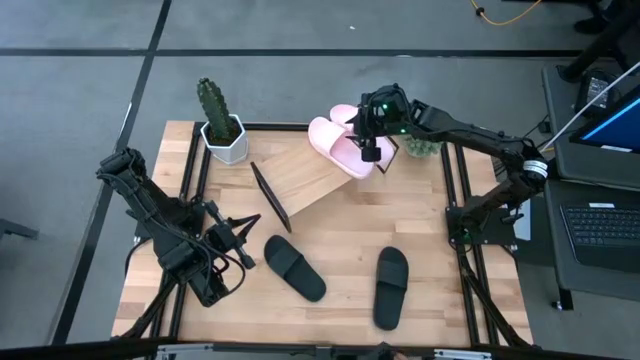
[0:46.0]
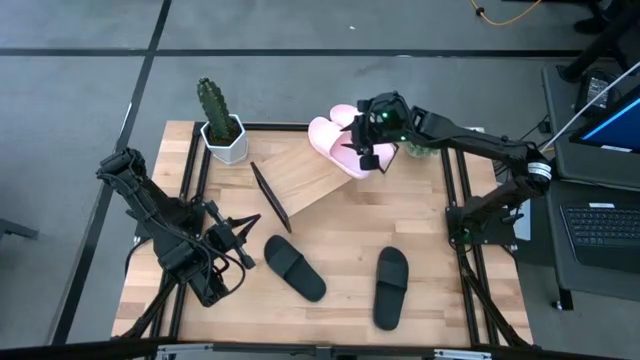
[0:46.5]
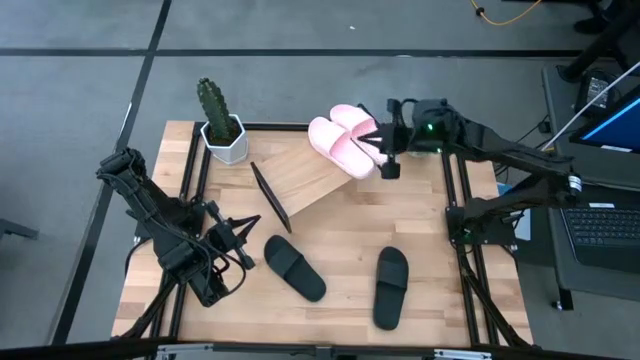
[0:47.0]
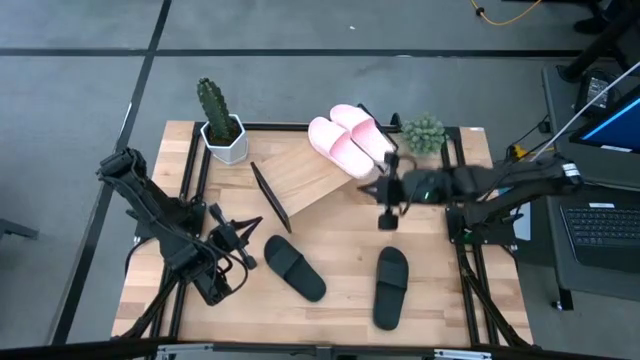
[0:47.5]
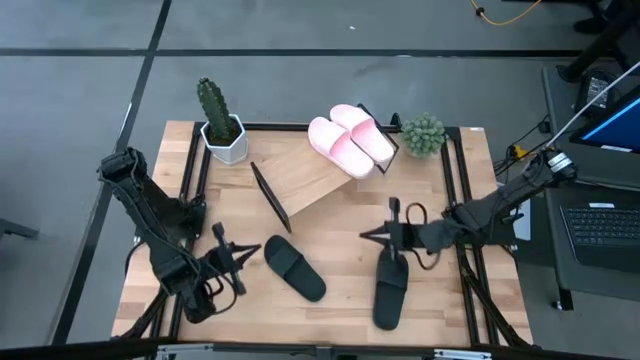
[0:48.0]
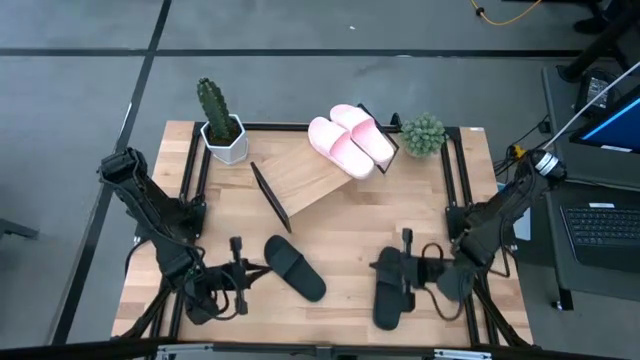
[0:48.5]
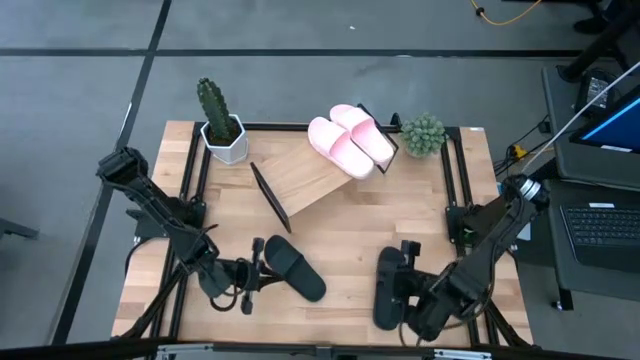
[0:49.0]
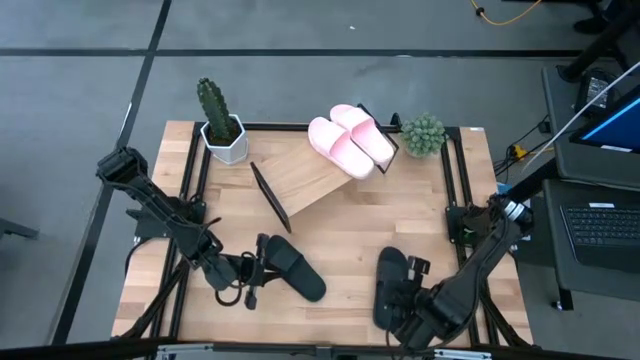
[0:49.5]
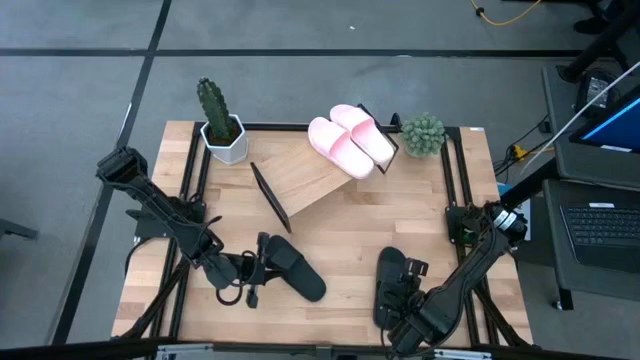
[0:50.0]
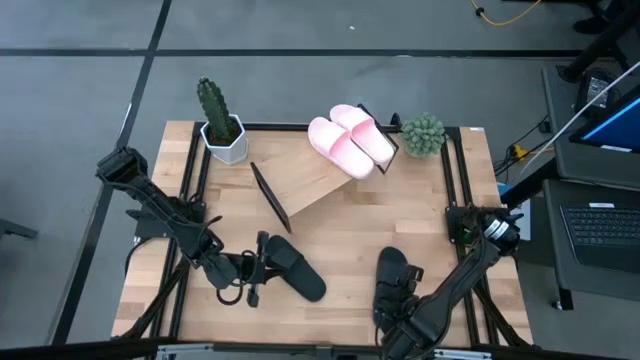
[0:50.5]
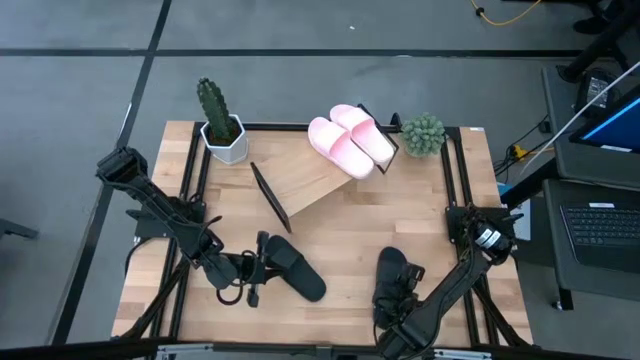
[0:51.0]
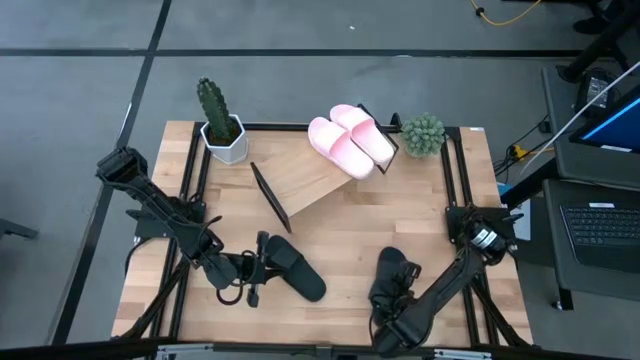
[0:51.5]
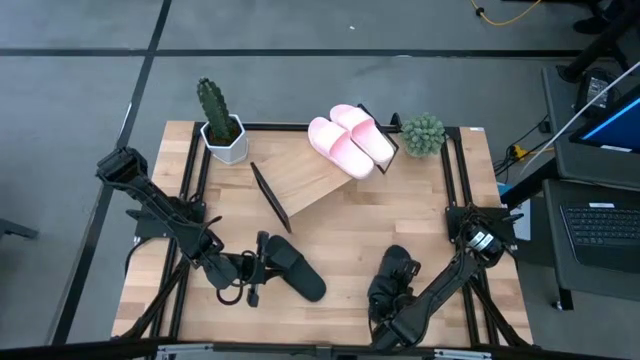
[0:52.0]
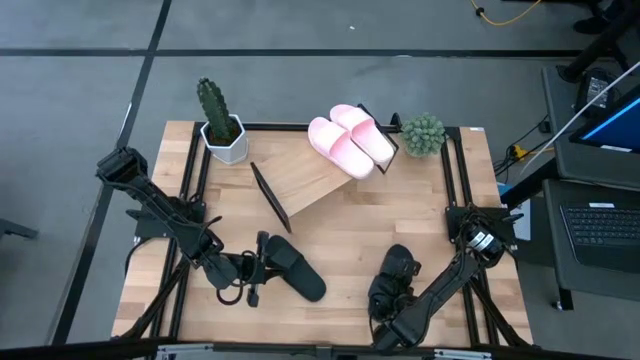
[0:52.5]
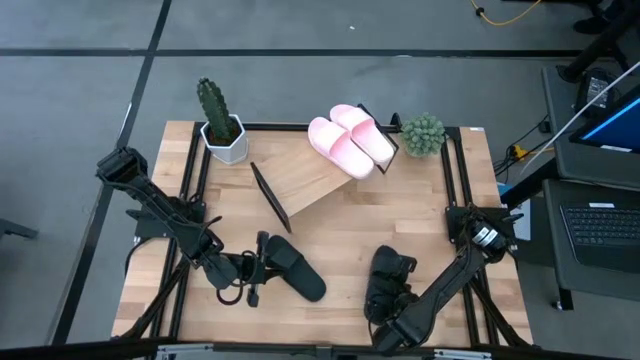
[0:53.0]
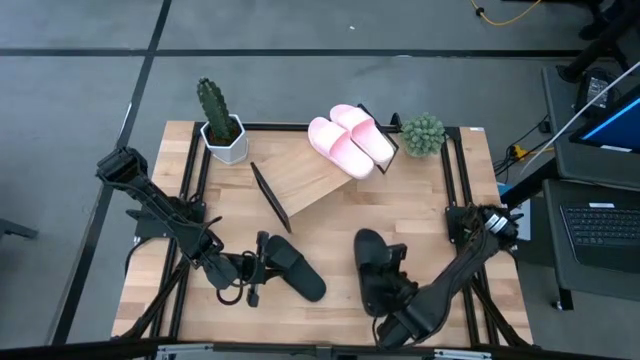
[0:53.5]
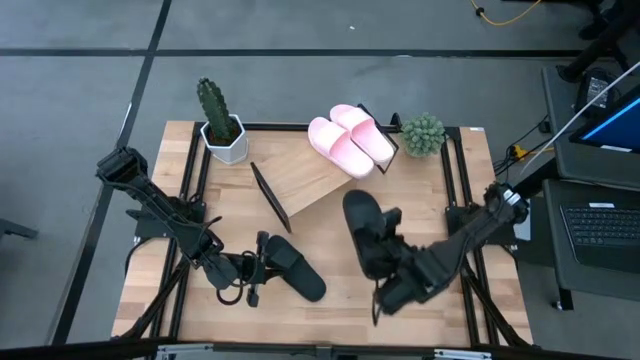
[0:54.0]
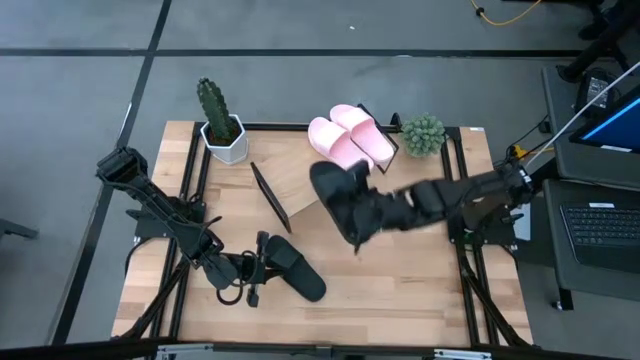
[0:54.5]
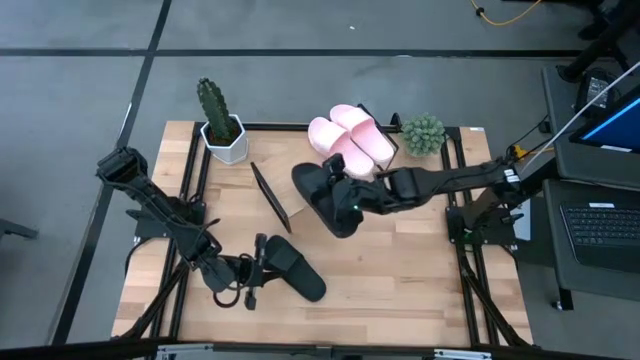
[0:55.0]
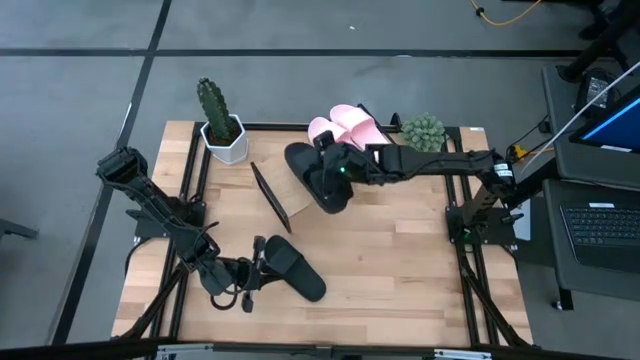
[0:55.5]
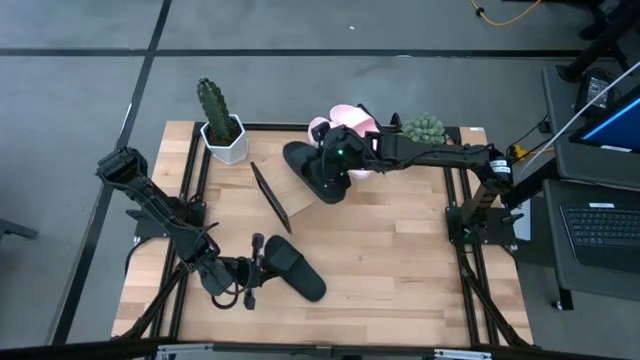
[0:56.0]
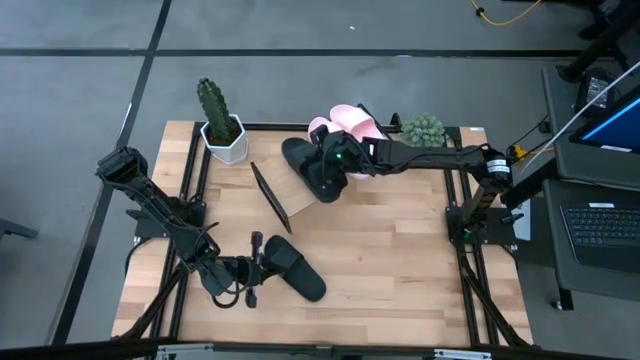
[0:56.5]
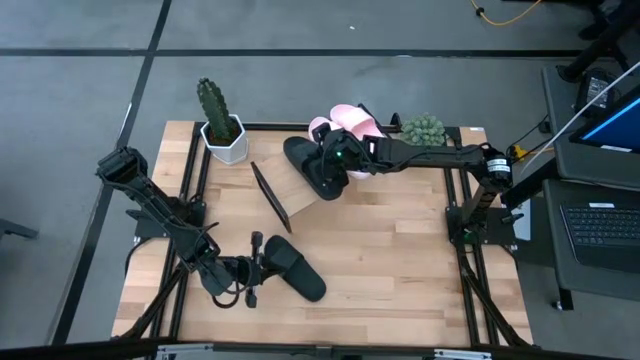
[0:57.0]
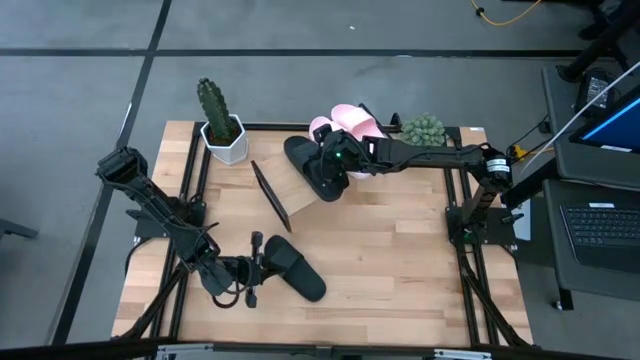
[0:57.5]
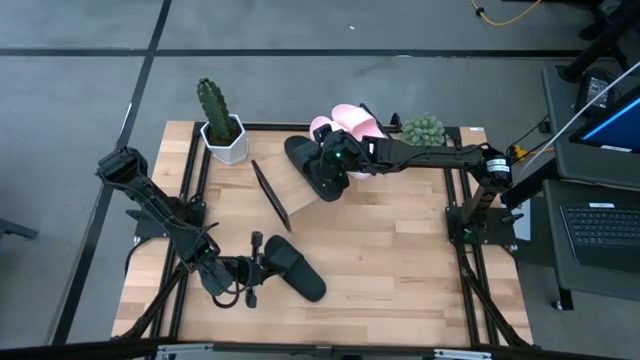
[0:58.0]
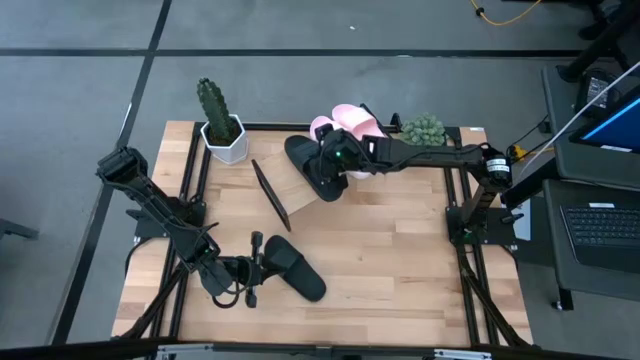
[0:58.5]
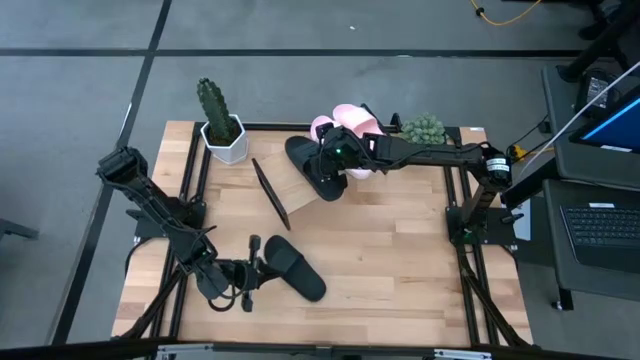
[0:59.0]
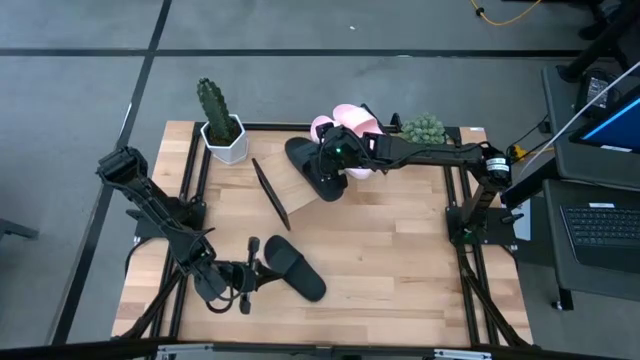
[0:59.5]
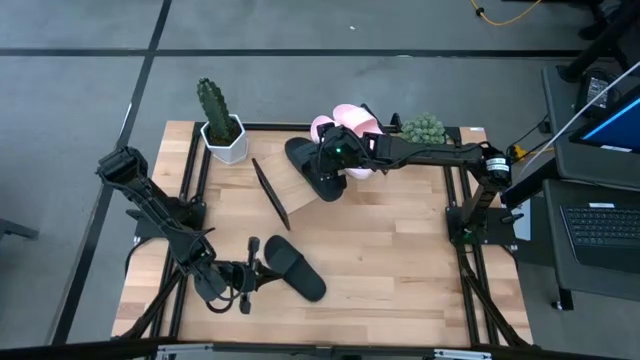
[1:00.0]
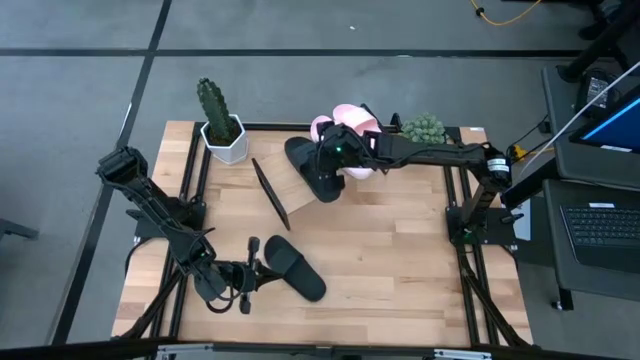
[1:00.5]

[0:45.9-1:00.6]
Task: Pick and place slides into the shelf
Put the right black slides on the shelf

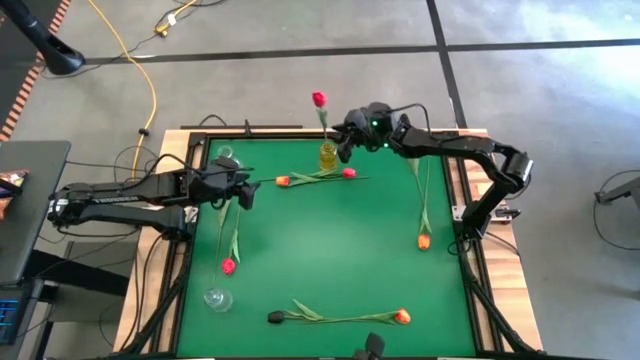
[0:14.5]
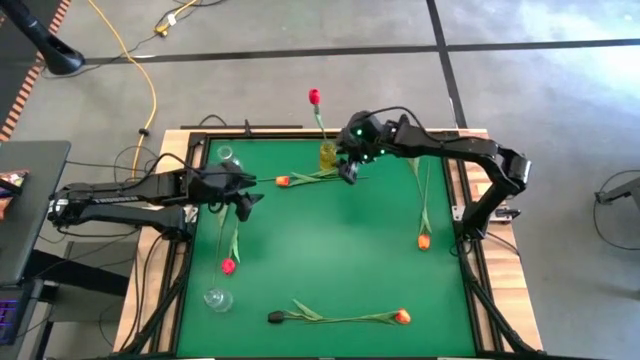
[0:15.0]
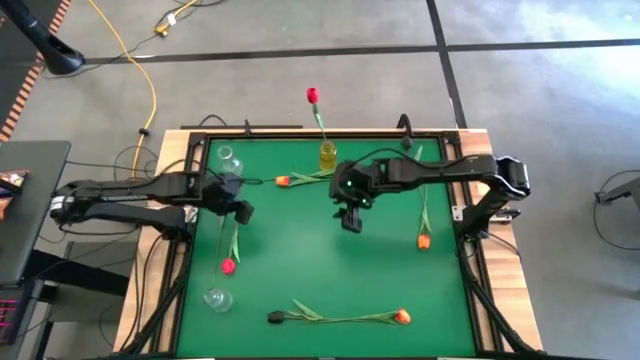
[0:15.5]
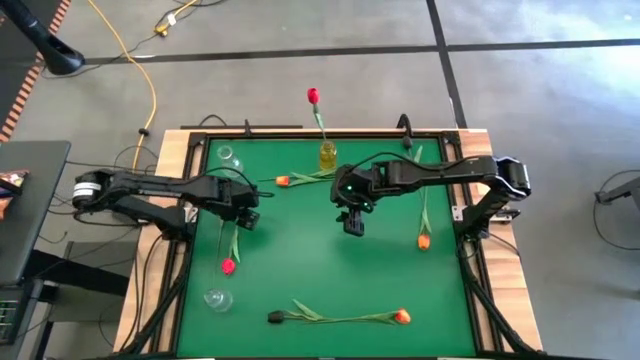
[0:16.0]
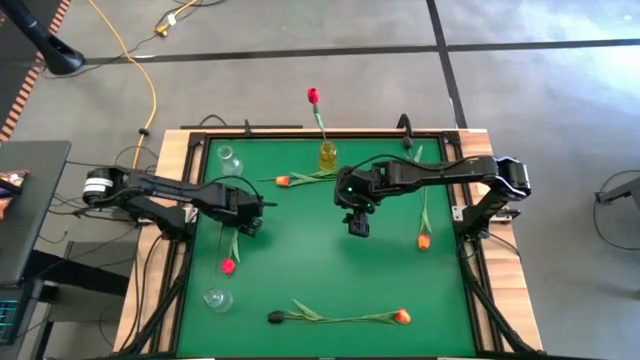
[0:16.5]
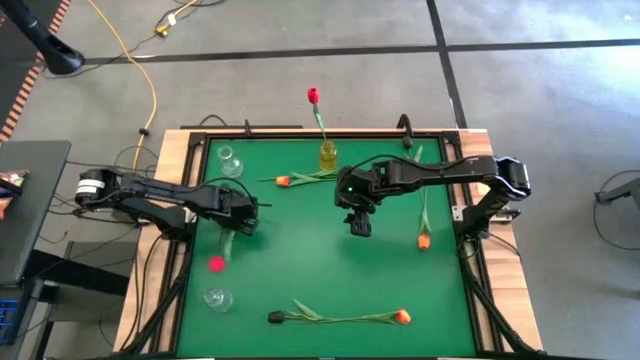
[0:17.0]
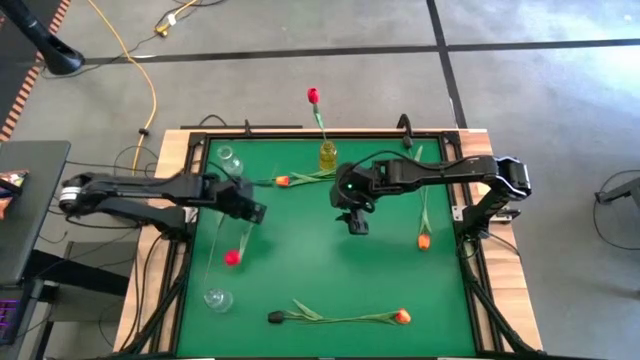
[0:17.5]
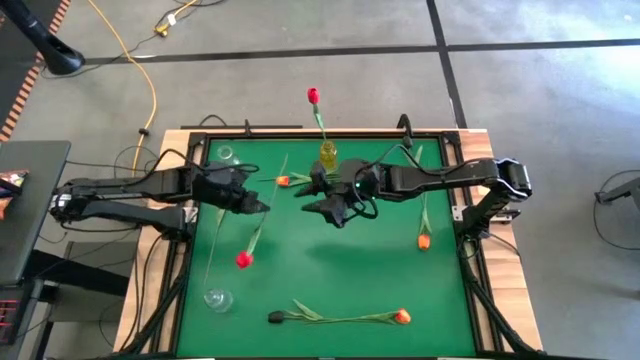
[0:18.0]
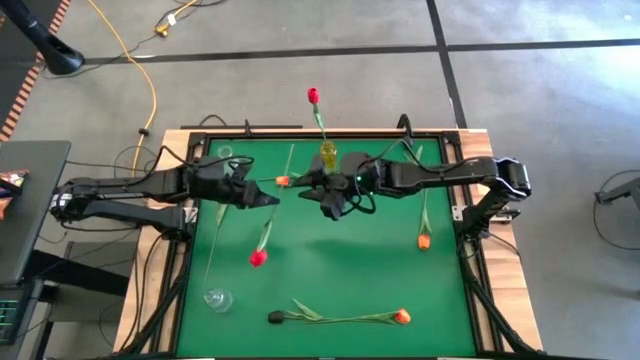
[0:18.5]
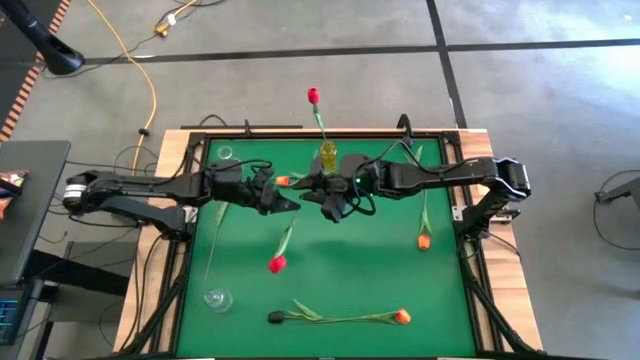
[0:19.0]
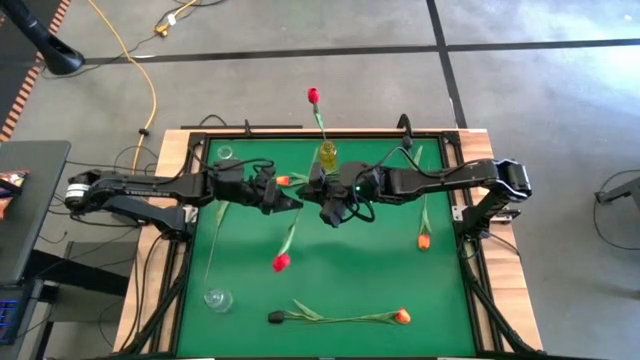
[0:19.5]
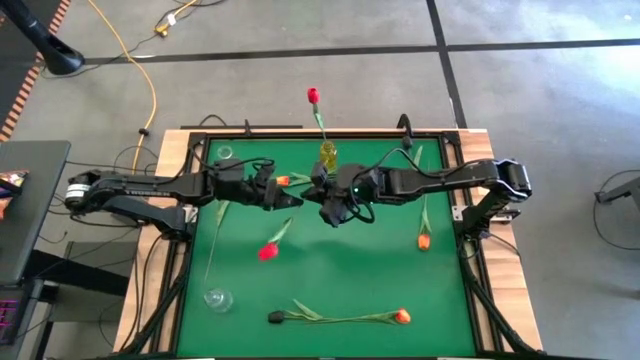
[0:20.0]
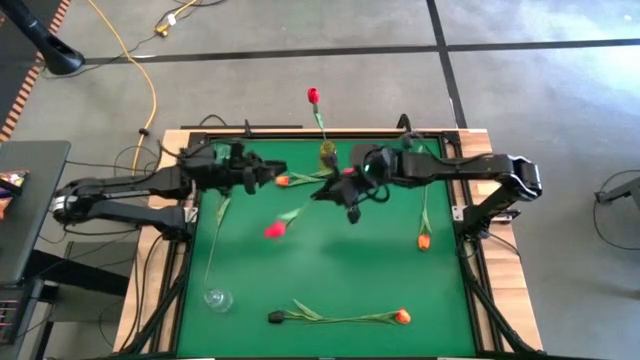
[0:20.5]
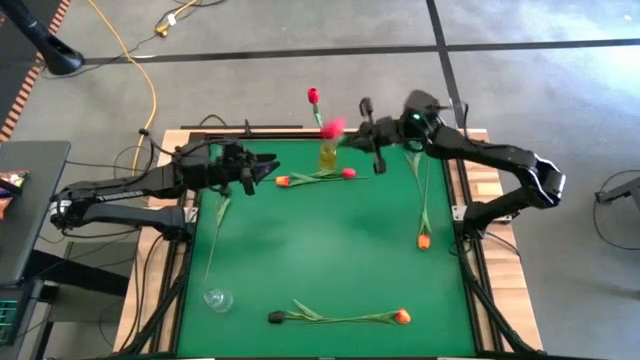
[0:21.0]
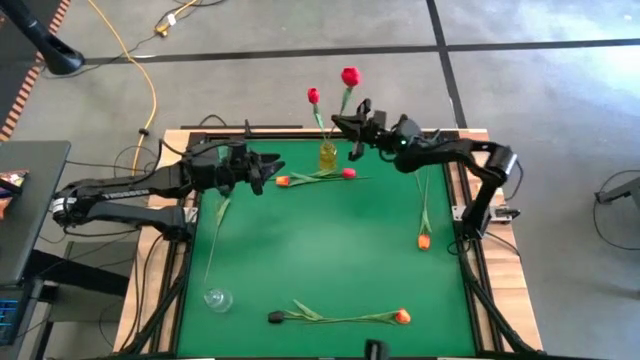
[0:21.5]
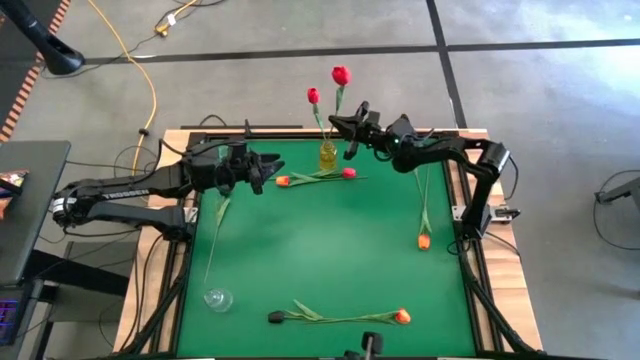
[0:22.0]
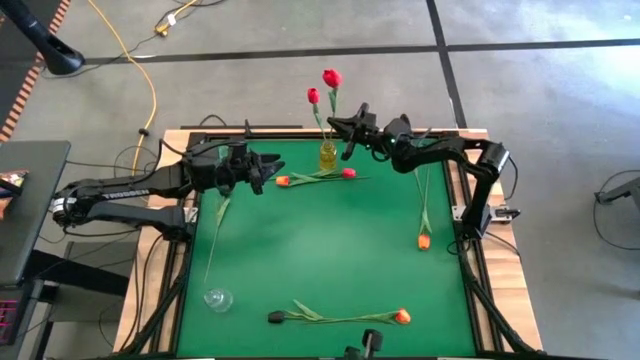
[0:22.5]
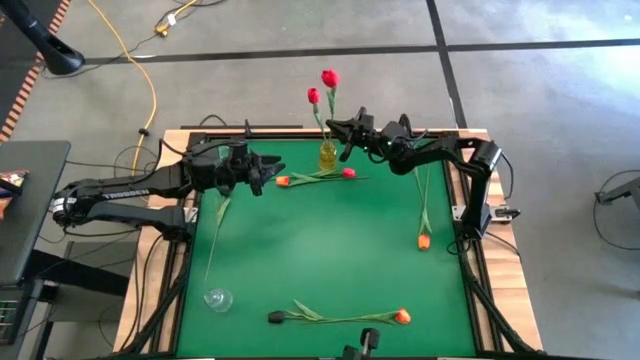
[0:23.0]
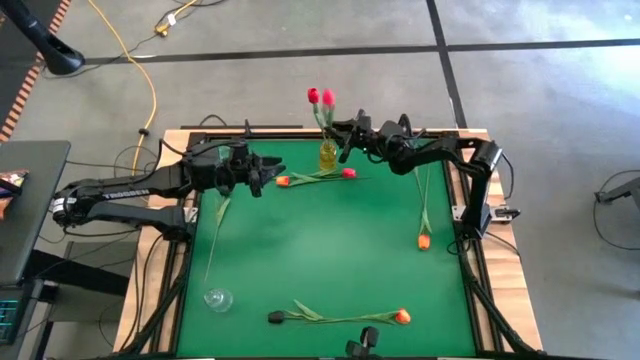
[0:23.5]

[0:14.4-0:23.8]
Task: Sort flowers into vase by color
Put the left red flower into the yellow vase
